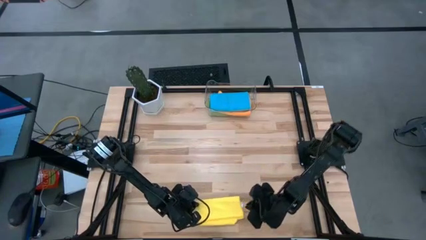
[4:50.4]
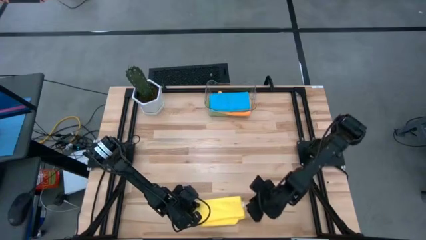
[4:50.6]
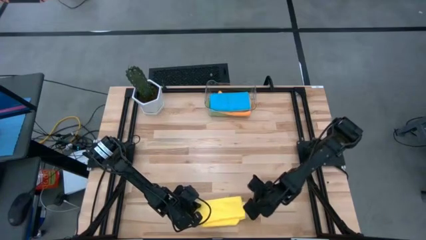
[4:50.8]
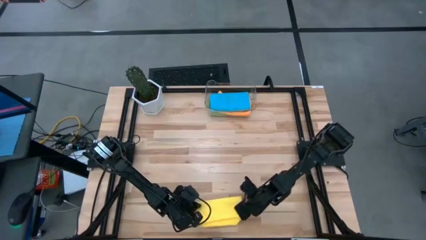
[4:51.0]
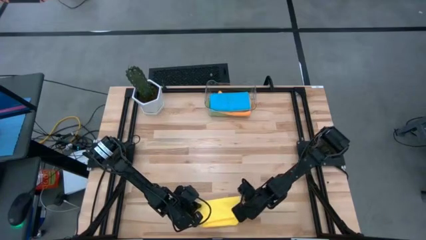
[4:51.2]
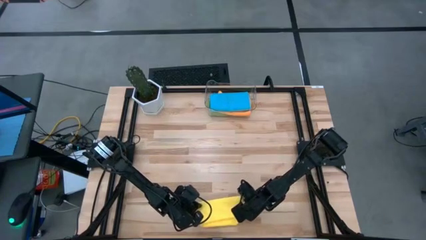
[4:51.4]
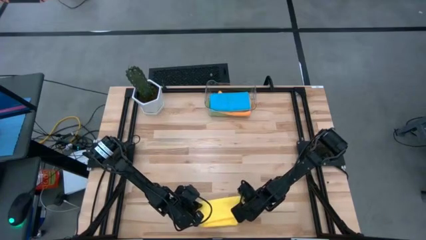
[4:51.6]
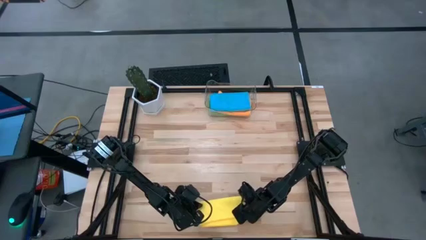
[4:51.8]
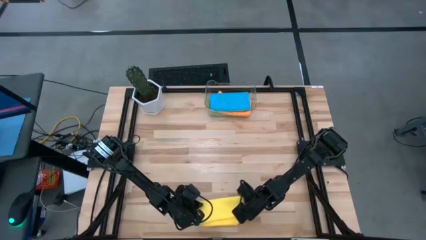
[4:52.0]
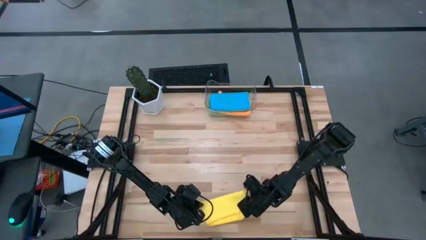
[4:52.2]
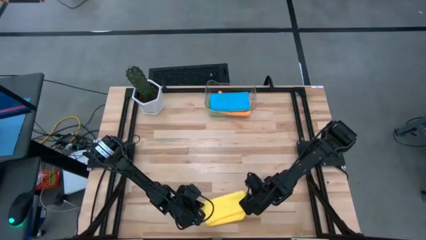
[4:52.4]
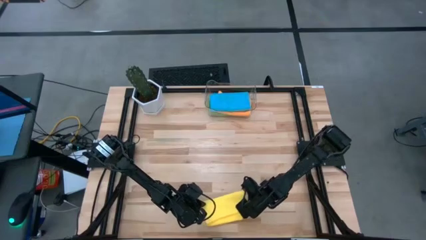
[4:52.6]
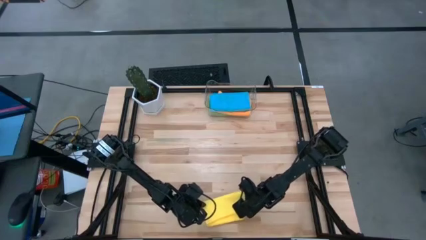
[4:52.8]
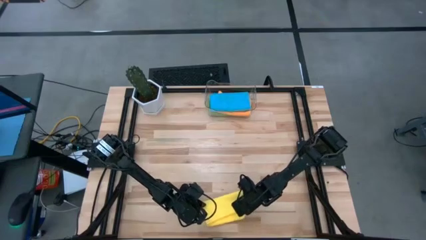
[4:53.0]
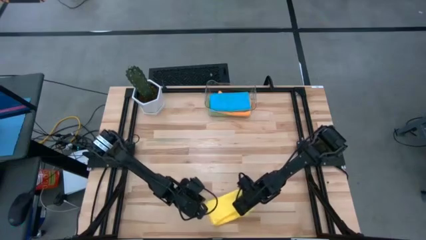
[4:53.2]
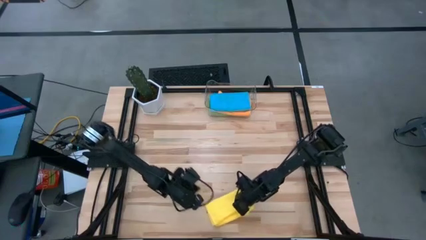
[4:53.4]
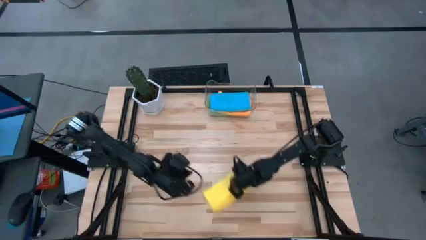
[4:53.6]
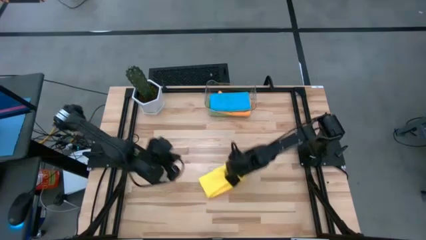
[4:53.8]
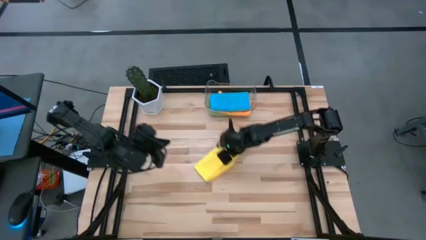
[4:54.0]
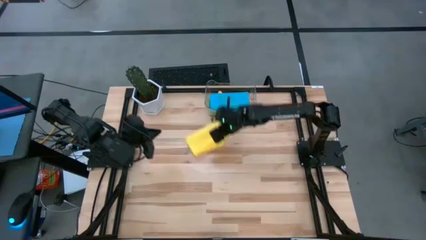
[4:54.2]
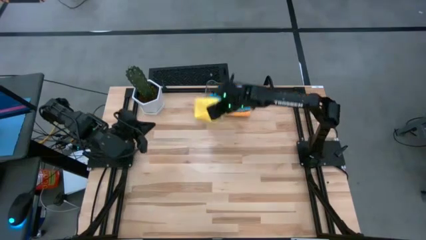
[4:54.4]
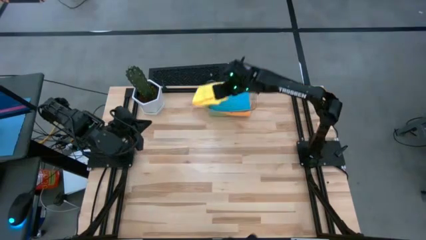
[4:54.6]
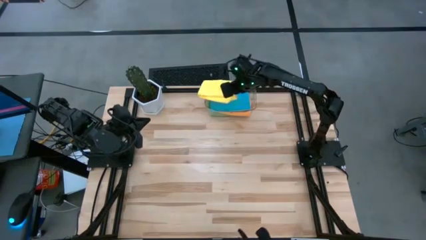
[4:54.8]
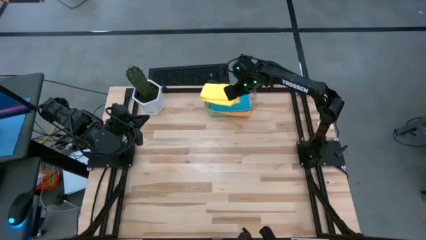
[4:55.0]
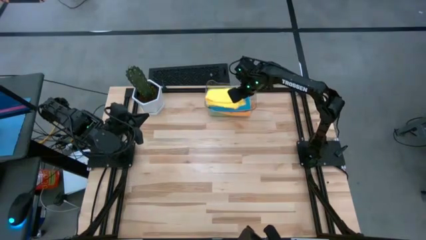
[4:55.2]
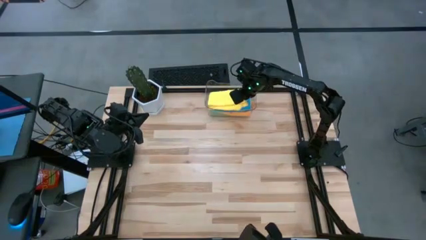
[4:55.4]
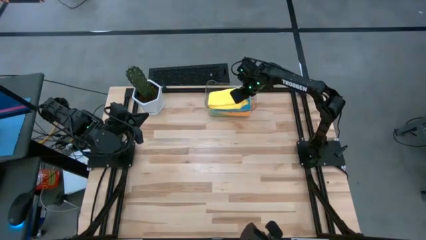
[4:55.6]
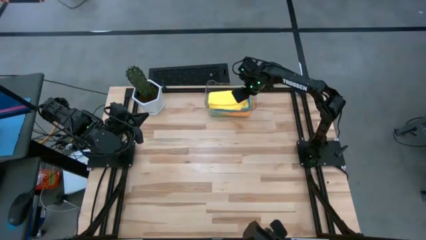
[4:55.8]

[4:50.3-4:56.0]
Task: Fold microfiber towels
Put the yellow towel into the transparent bin

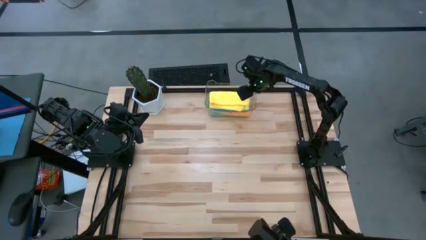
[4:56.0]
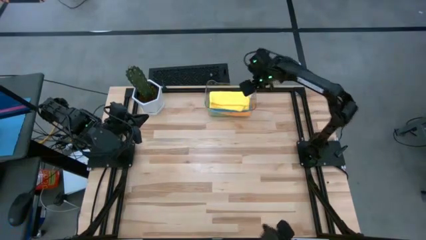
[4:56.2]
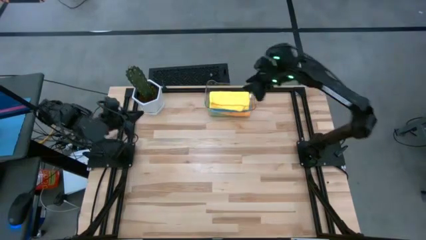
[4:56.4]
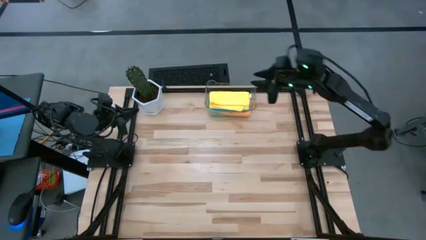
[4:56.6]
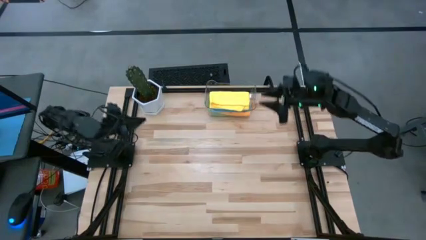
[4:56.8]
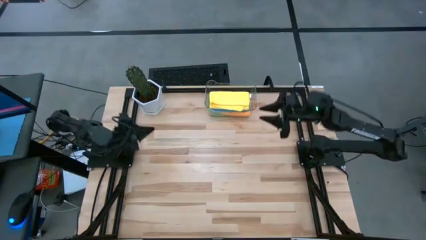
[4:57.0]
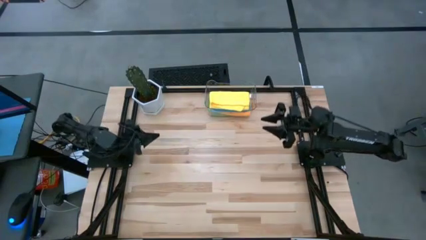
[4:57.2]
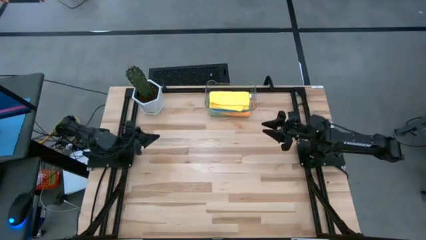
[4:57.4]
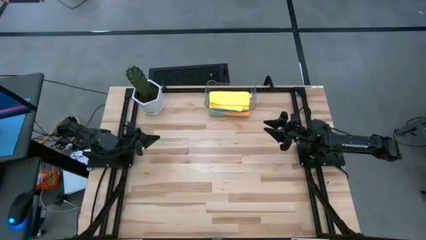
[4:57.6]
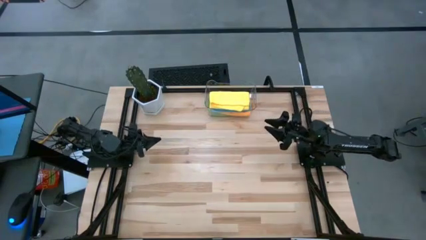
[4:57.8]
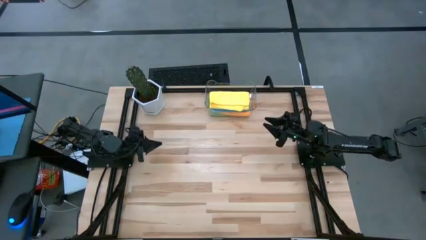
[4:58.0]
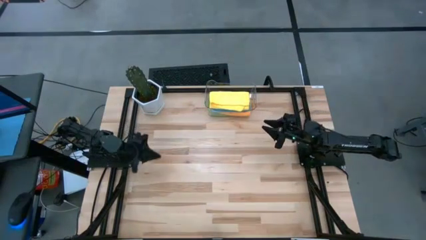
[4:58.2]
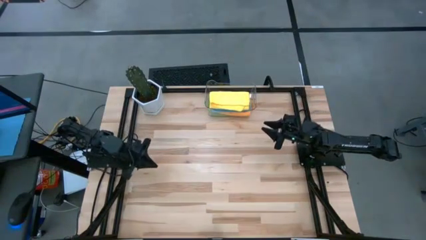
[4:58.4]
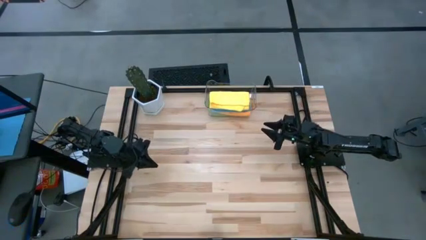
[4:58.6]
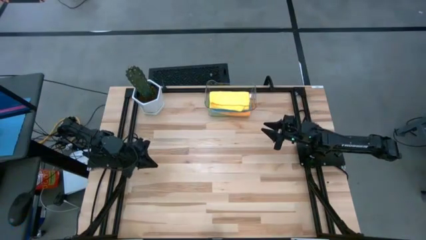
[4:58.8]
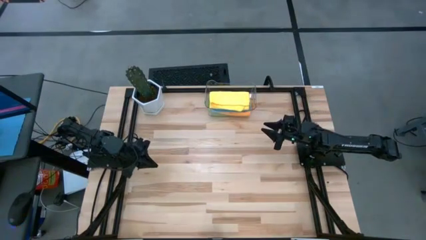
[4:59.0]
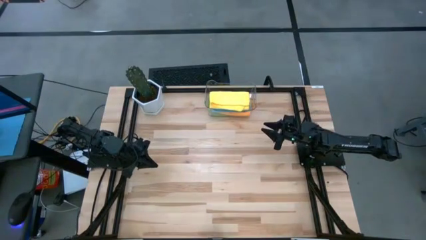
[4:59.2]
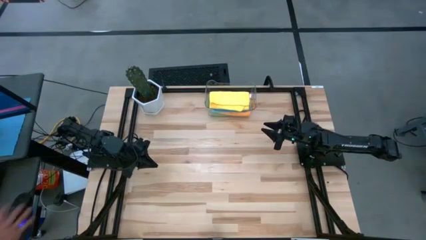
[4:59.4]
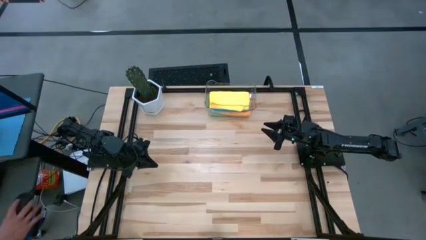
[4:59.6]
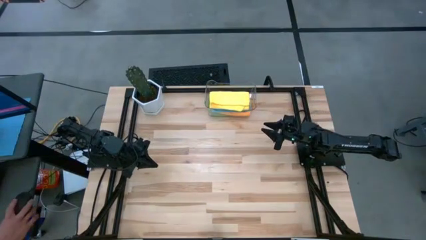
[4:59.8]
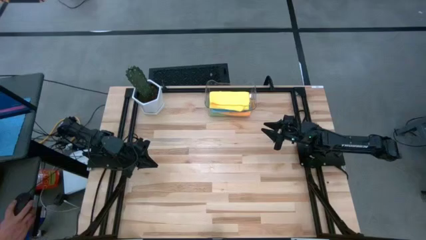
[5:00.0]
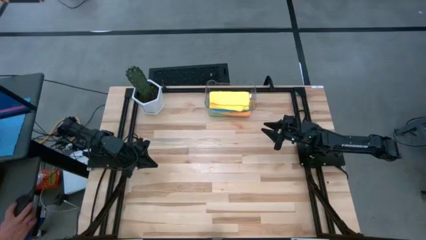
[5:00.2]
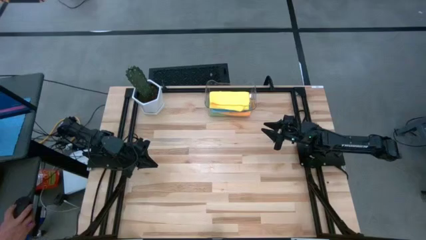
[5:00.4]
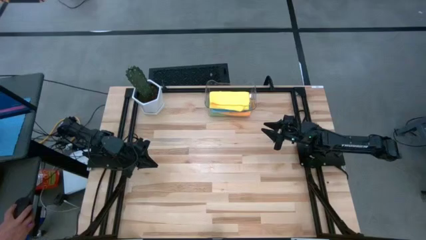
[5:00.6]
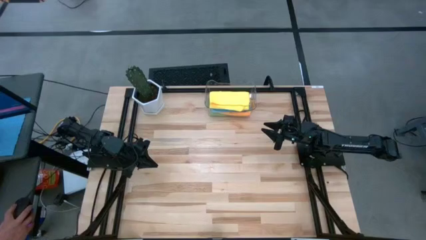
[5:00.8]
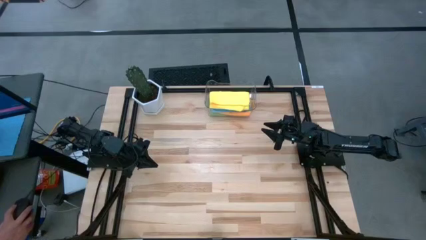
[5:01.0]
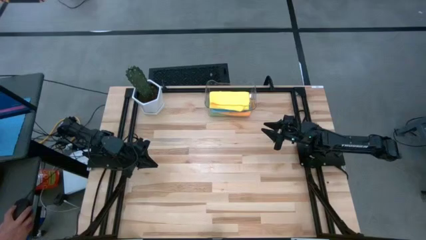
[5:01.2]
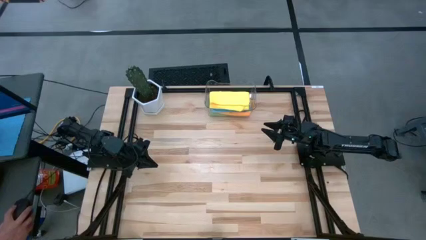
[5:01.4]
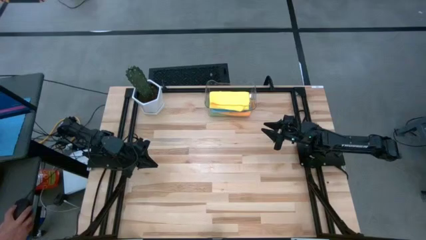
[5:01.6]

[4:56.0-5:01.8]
Return to Home Position

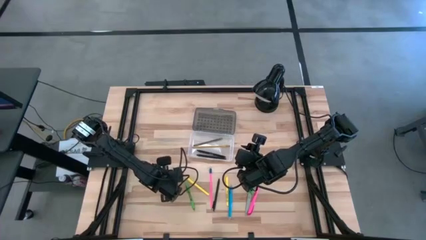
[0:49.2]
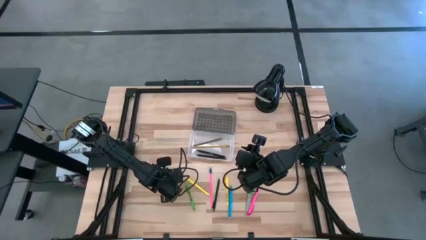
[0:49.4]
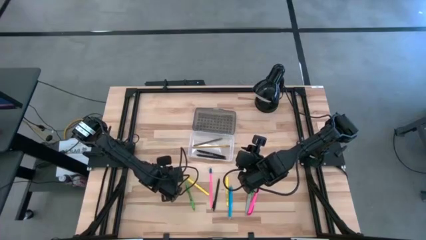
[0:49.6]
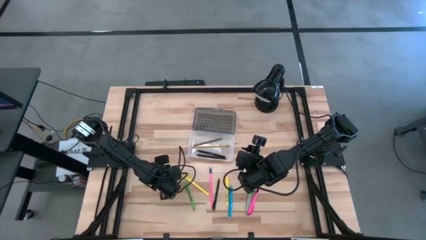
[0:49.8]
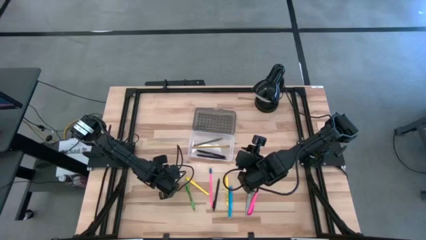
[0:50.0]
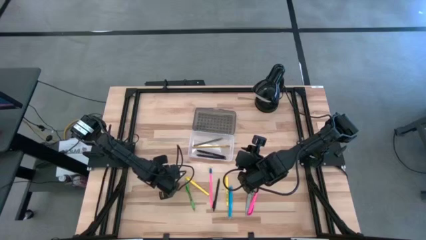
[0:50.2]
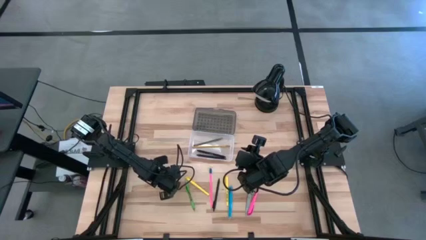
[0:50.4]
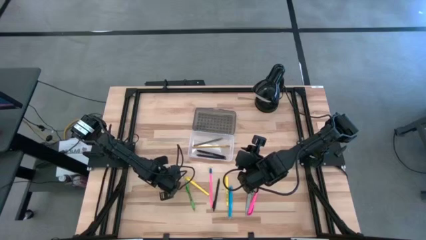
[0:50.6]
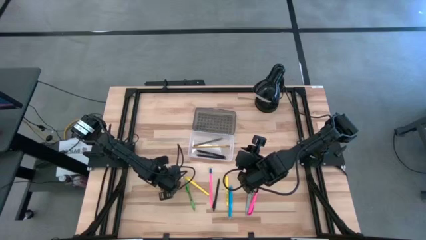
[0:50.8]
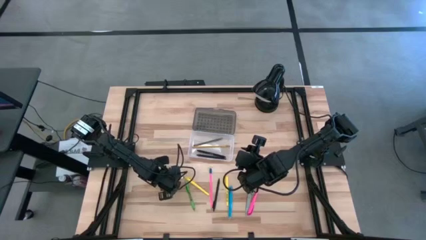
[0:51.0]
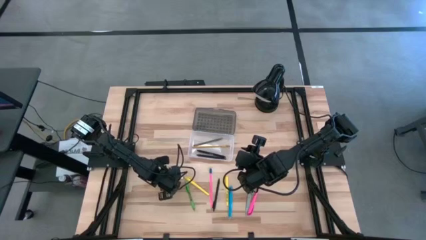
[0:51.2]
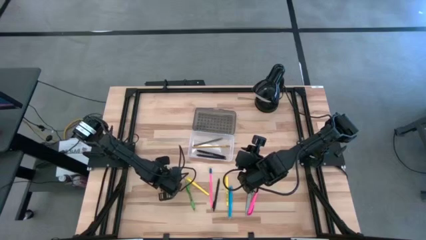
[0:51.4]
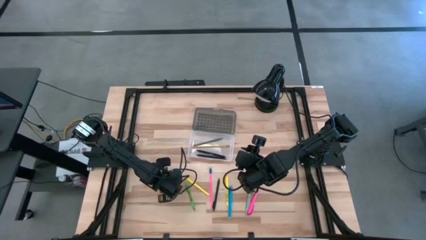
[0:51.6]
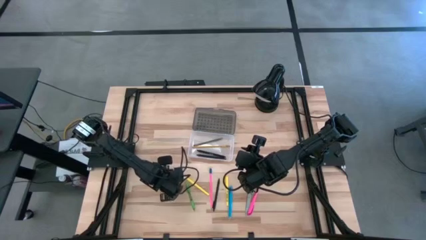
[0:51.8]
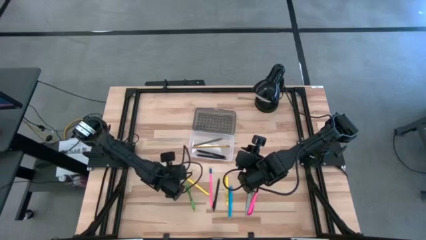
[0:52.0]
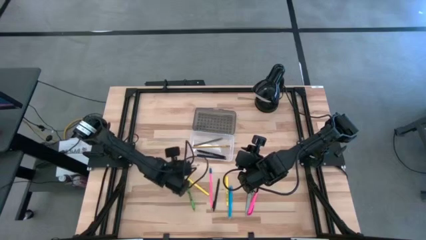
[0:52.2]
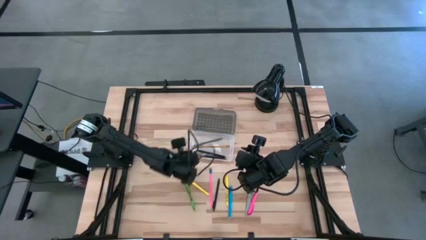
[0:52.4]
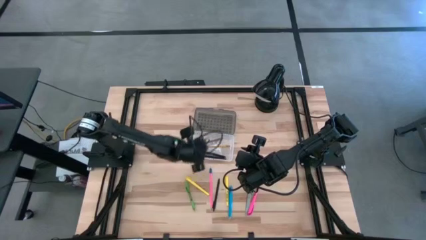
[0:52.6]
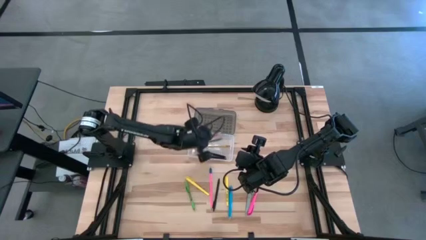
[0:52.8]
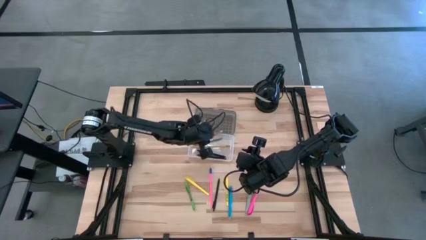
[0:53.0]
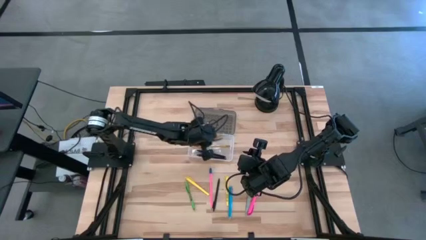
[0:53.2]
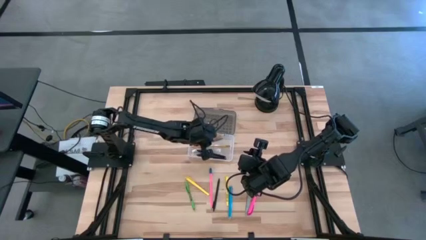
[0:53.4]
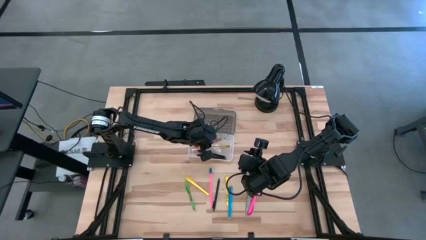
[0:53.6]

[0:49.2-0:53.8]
Task: Pick & place school supplies into a supply box
Put the orange pencil into the transparent supply box
